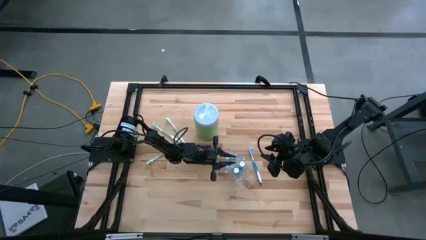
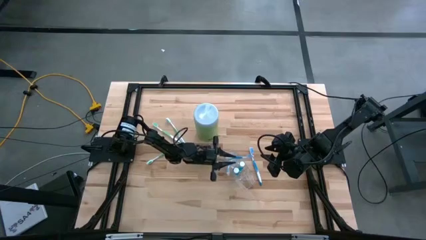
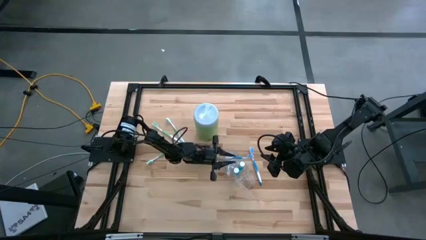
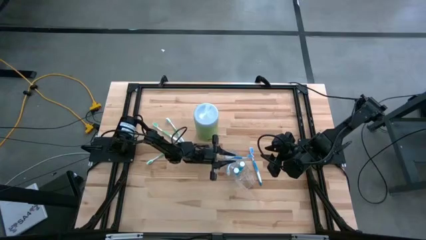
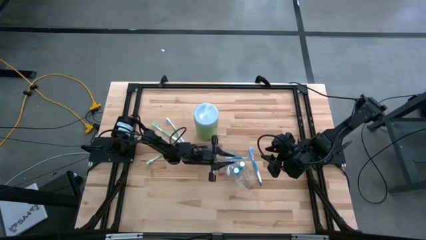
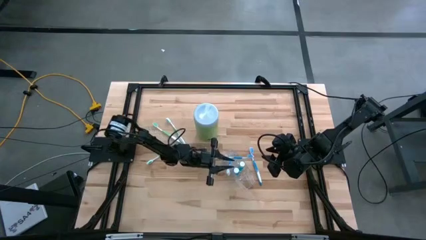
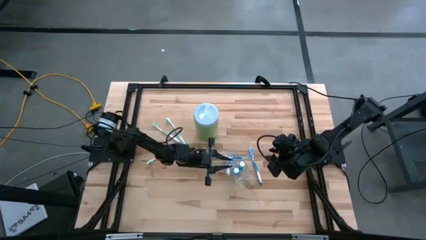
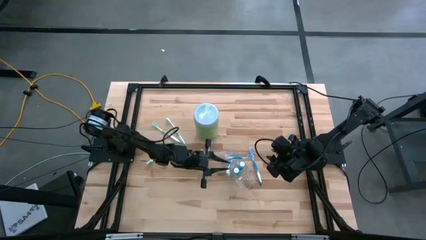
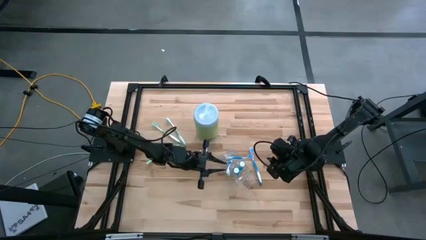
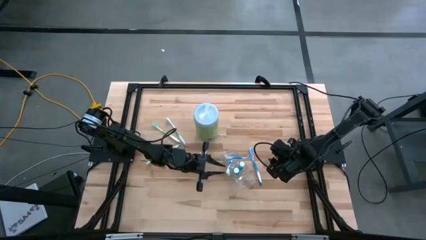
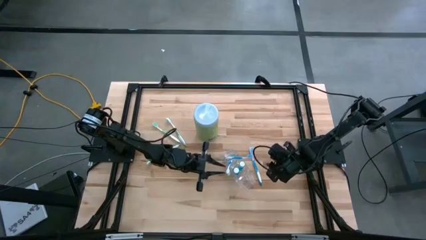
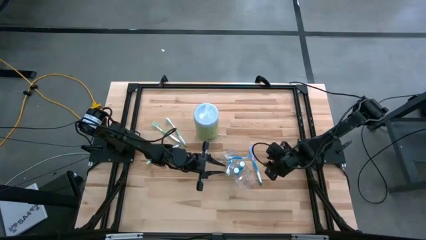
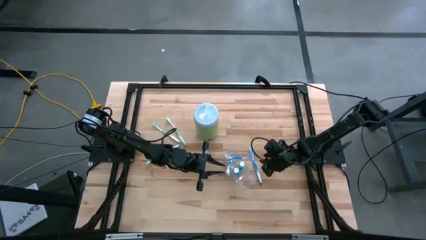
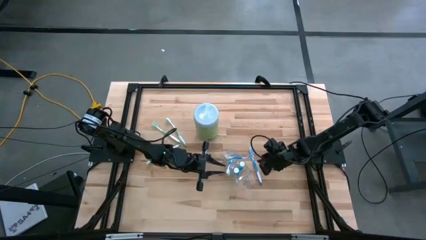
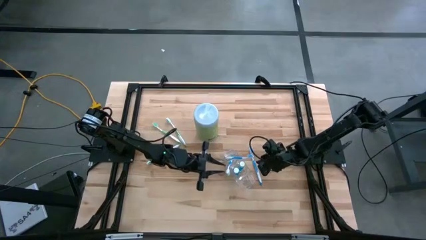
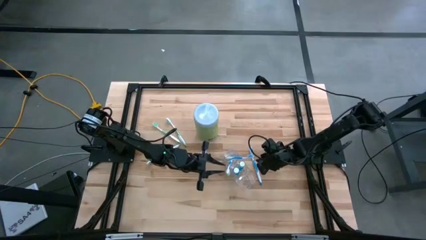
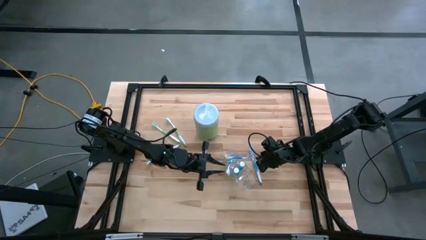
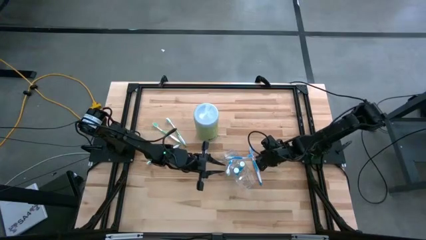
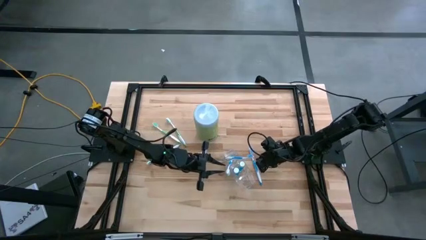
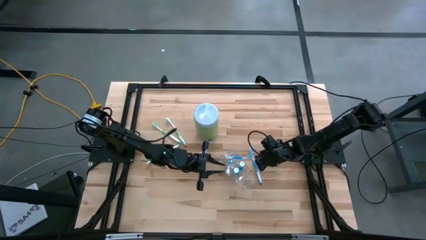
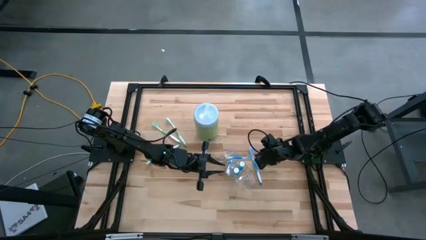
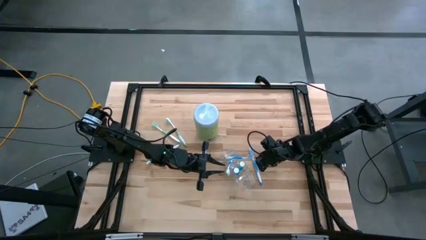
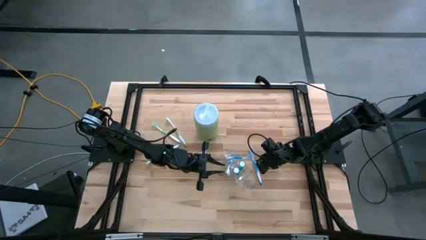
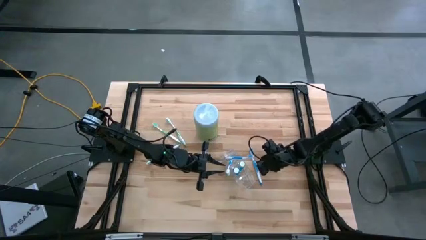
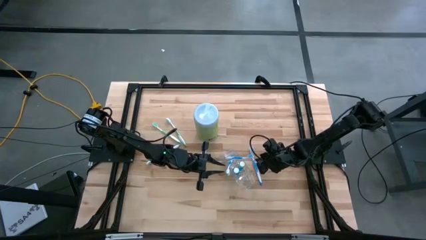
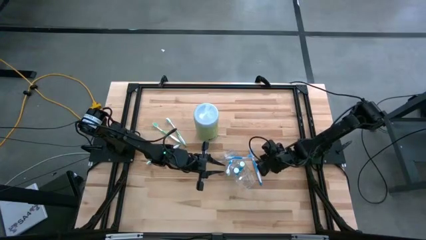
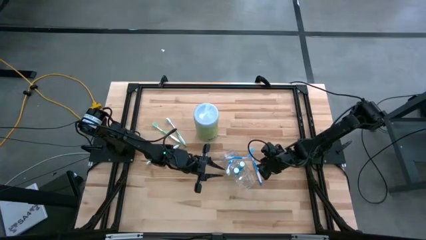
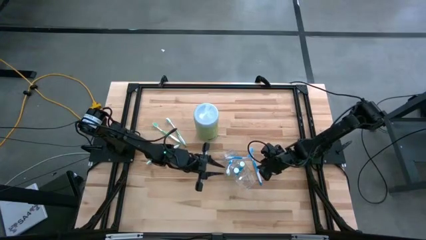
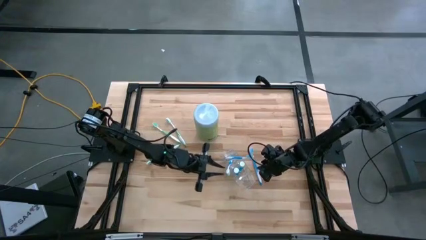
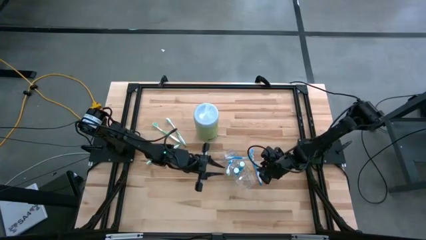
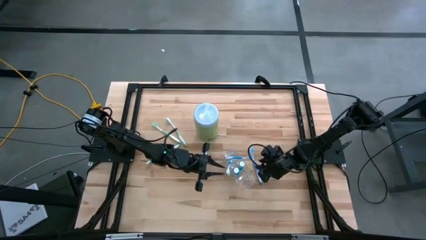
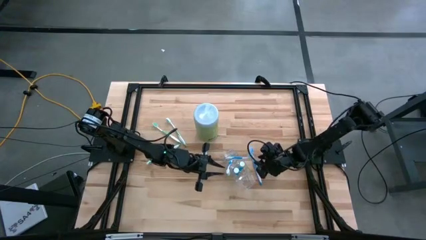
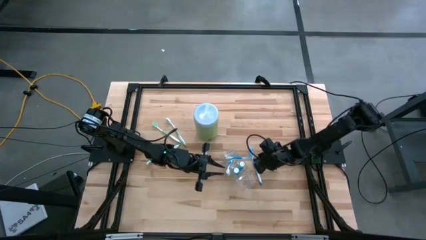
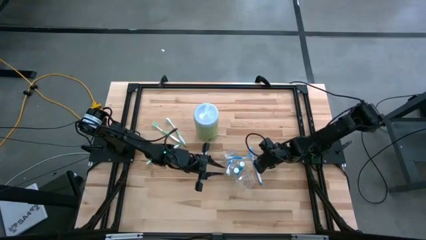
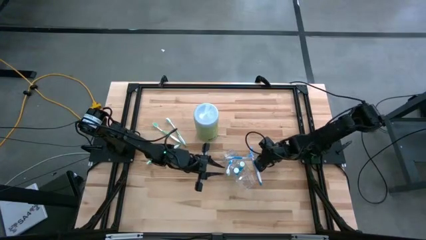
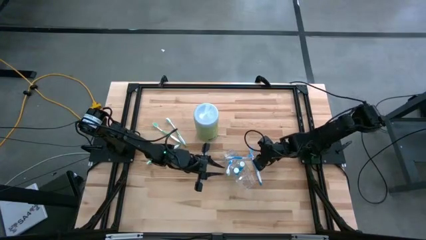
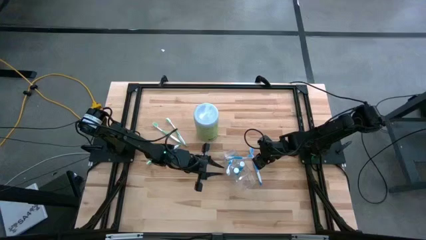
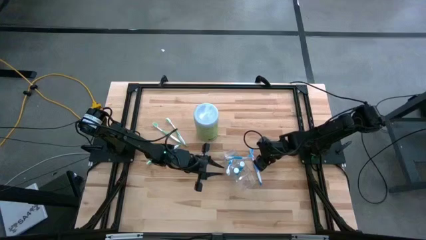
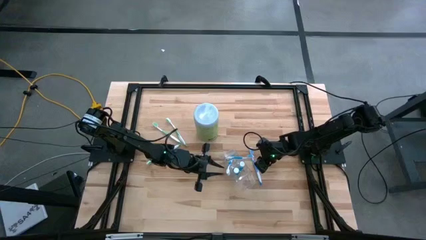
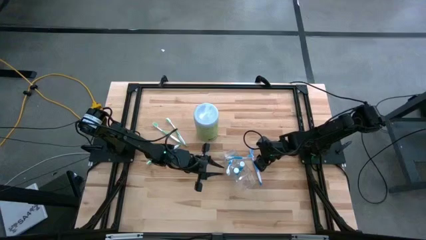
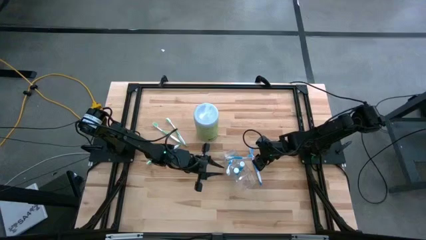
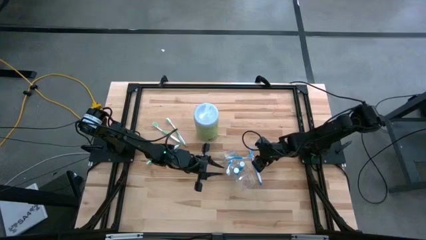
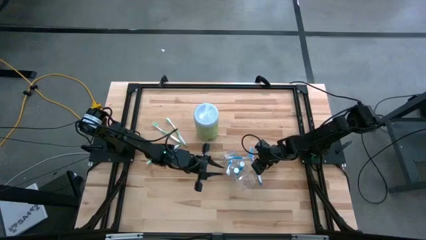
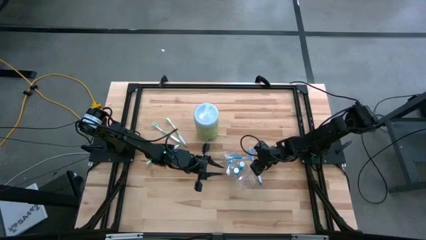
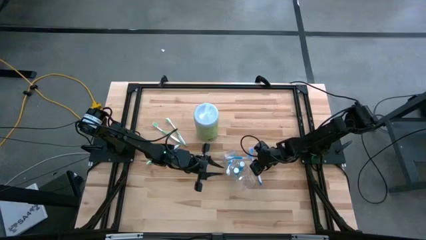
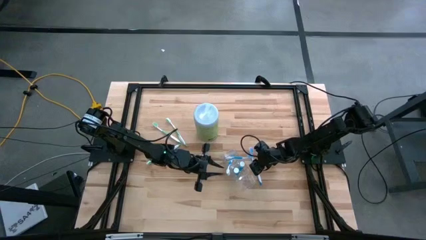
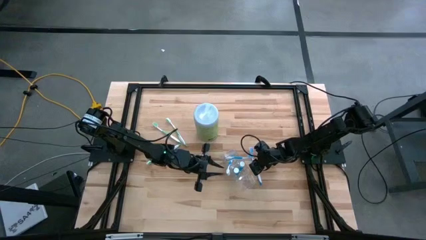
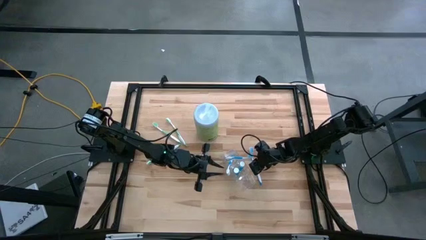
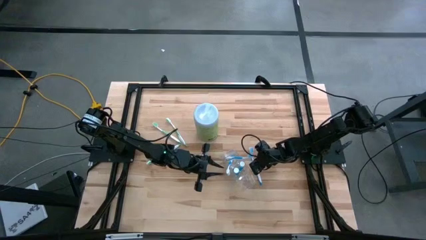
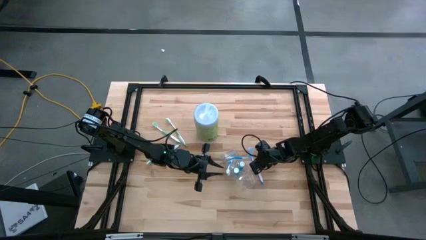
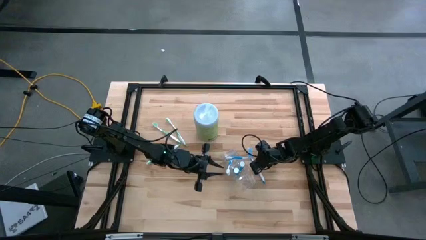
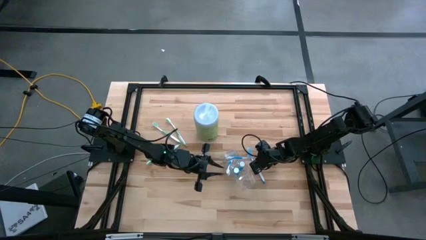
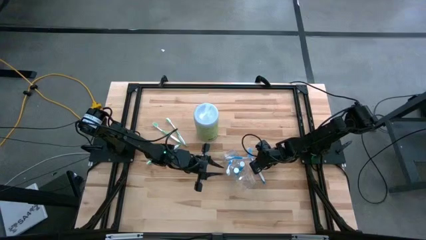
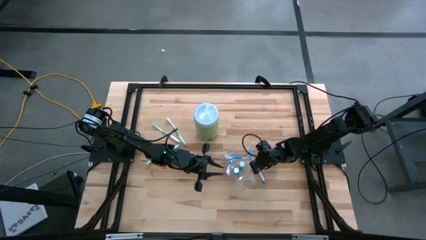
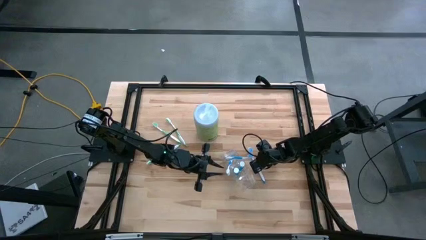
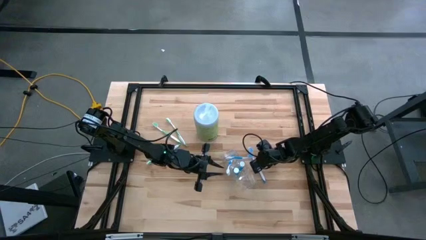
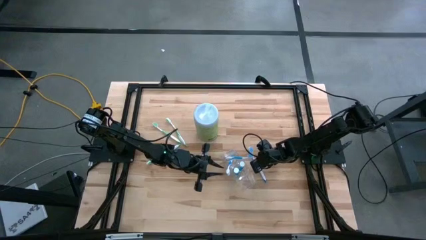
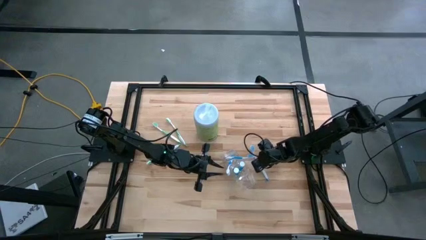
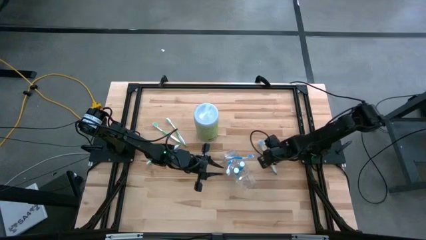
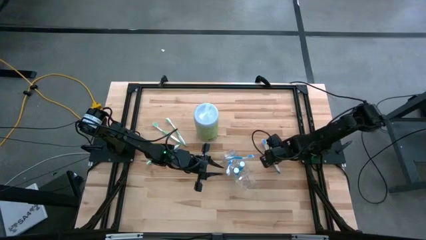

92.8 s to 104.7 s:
Task: Pick & Place toothbrushing station
Put the blue toothbrush into the transparent organizer

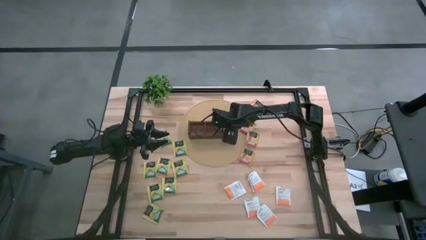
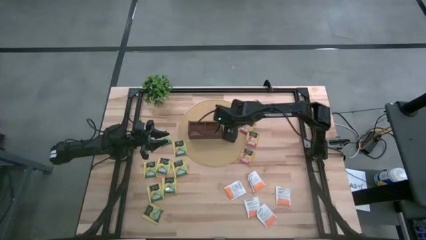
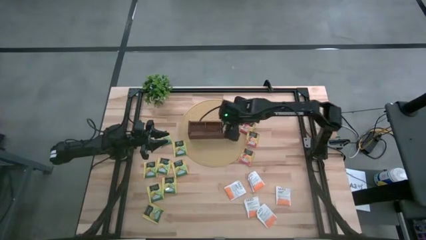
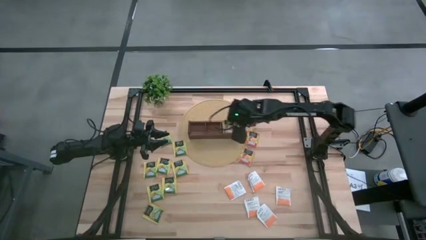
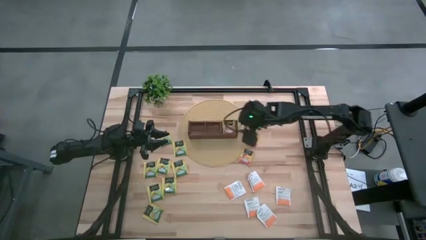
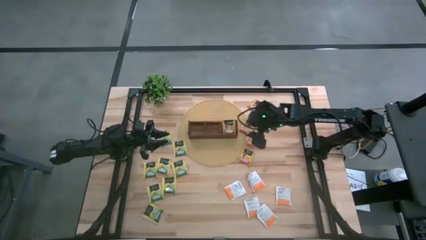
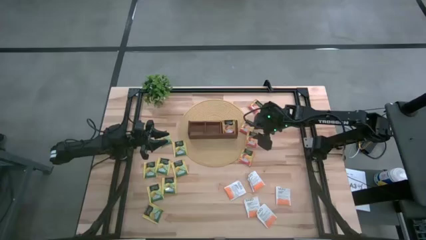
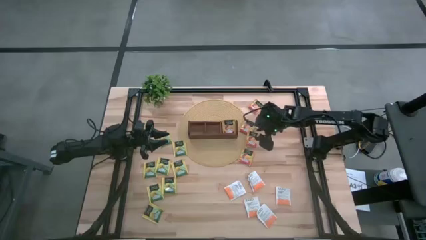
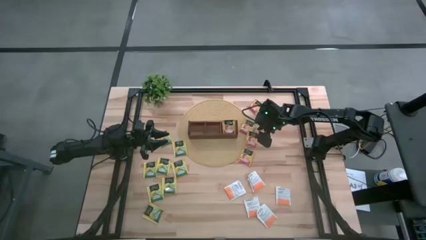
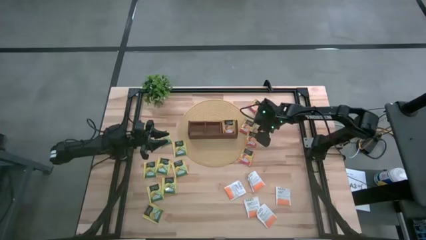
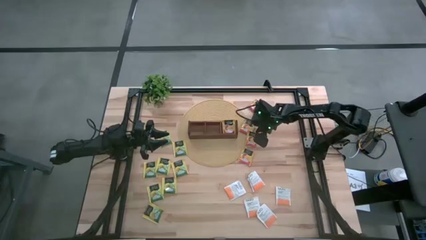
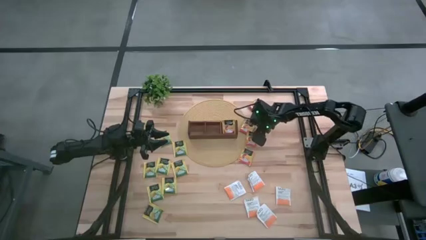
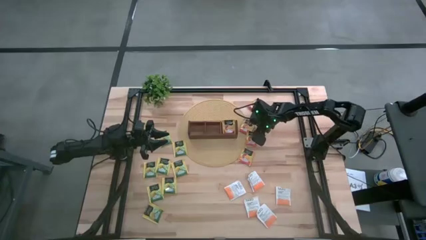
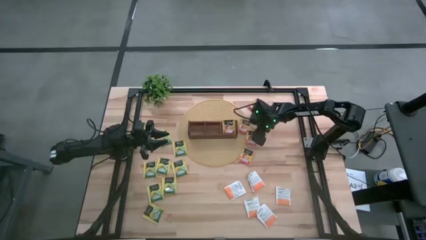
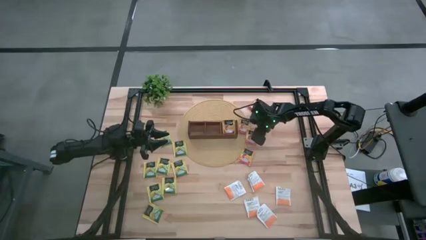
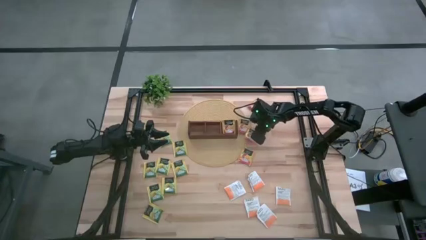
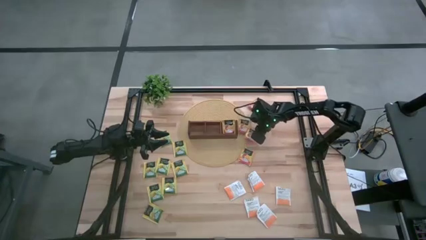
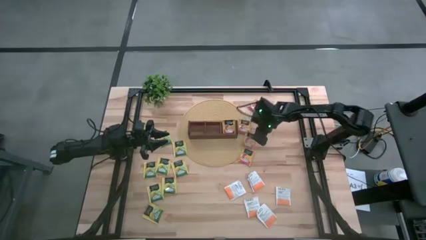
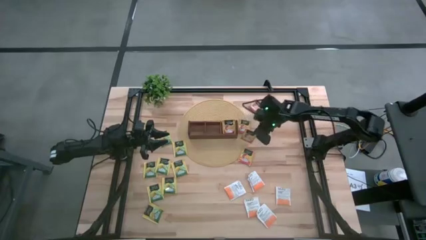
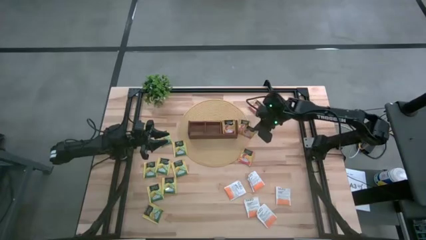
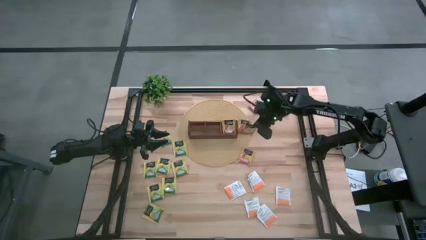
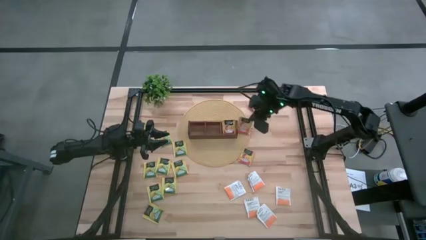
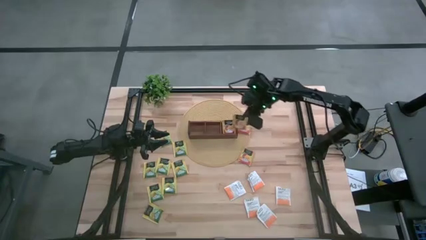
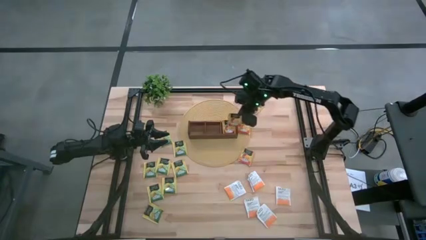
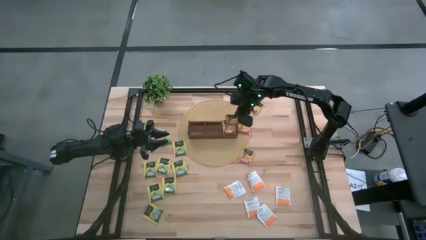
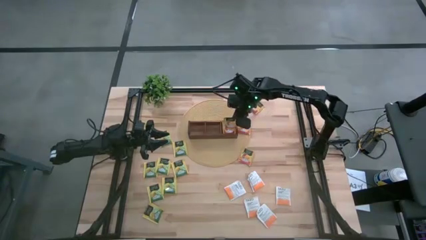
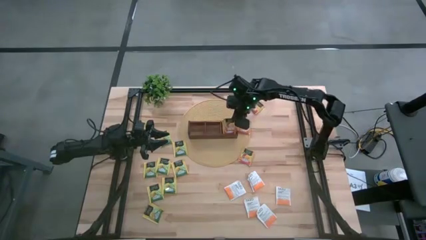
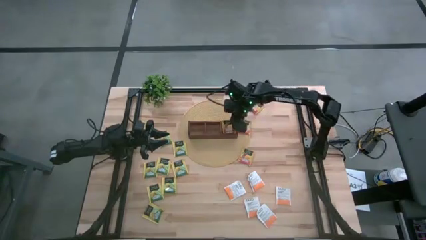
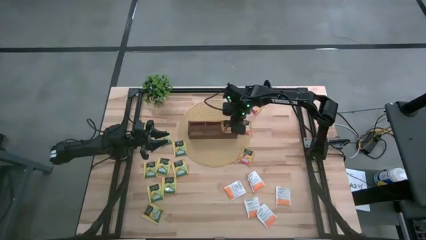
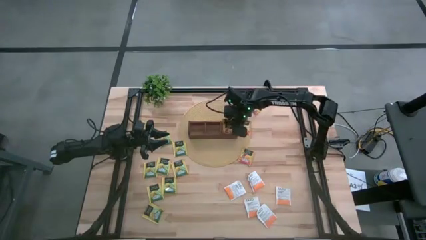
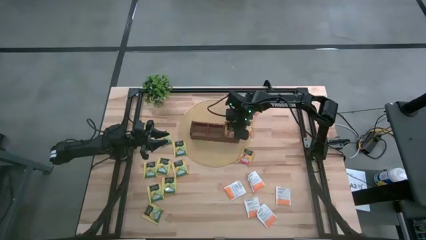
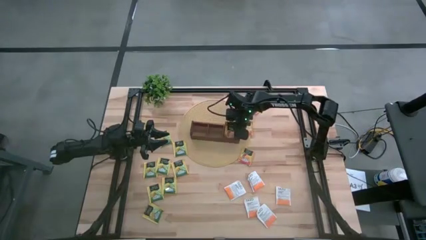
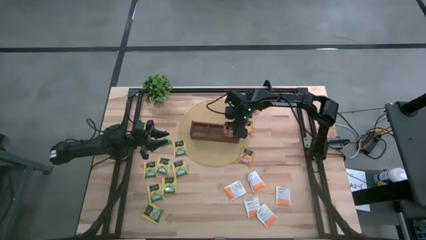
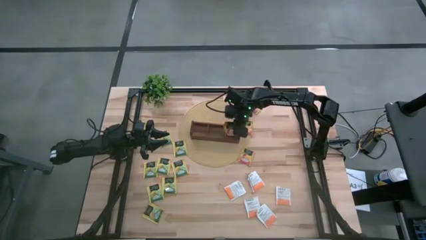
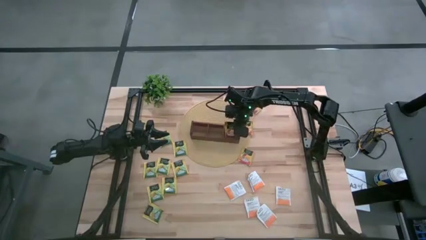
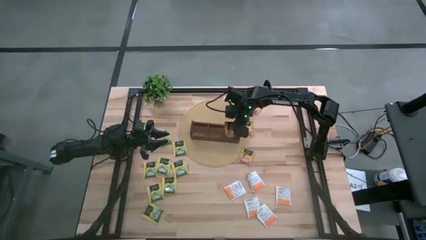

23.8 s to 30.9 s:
Task: Pick & Place Tea
Put the dark yellow tea bag into the right section of the wooden organizer
